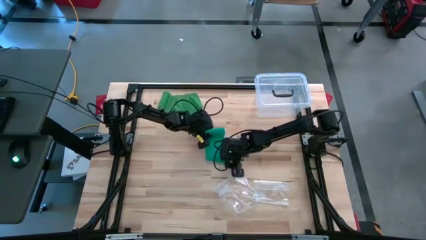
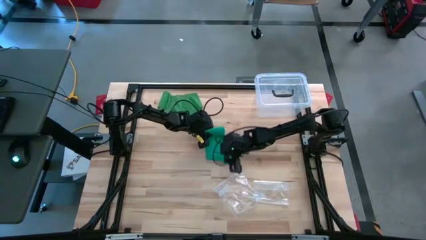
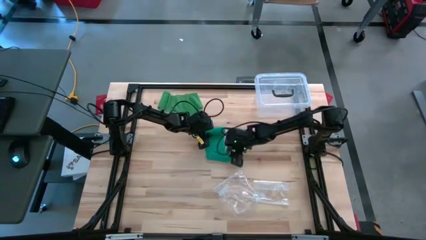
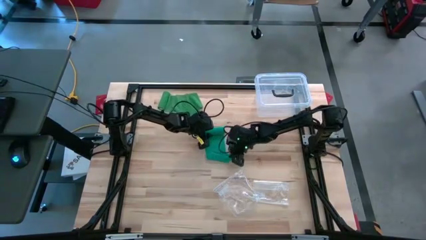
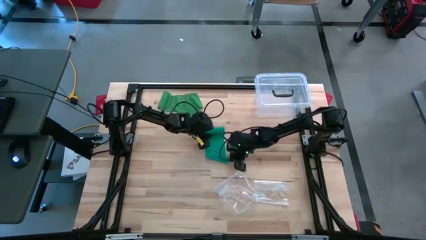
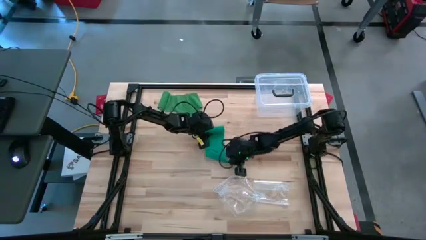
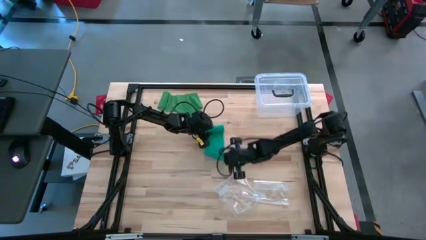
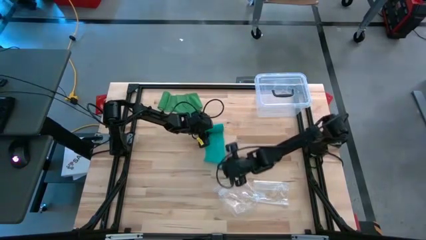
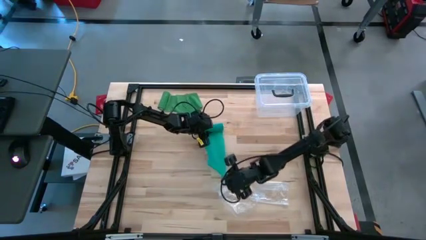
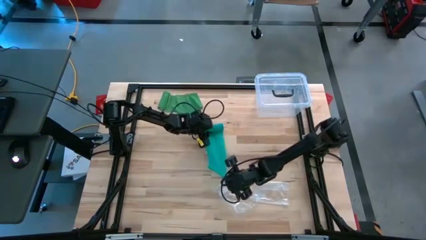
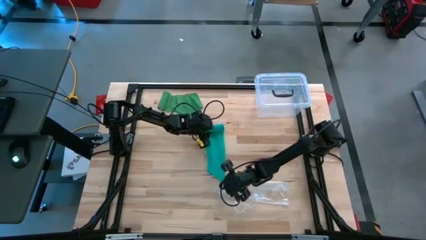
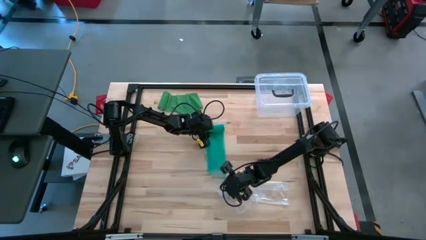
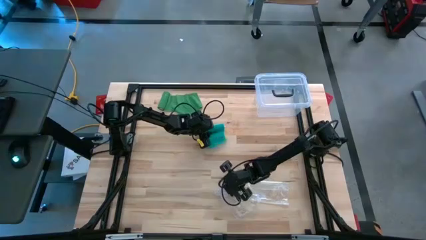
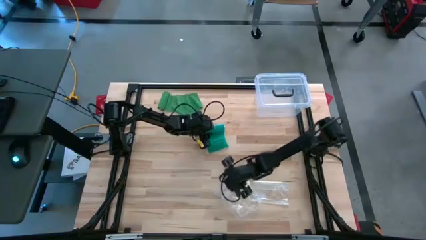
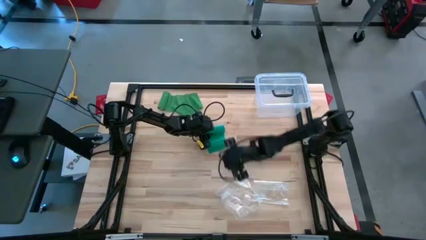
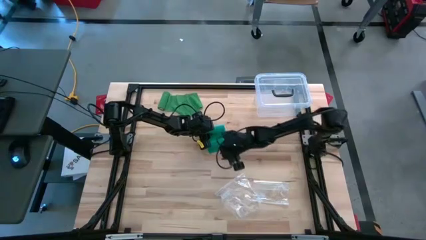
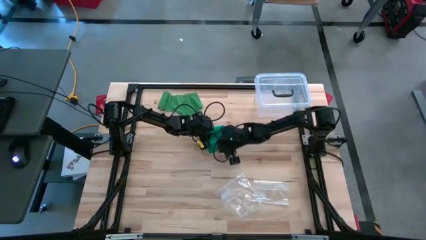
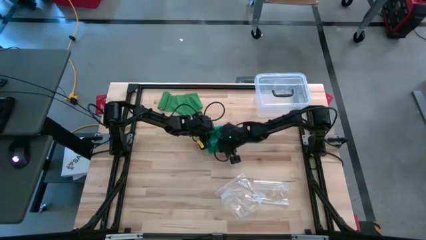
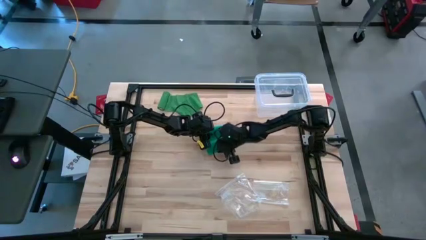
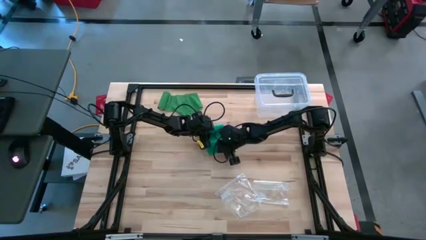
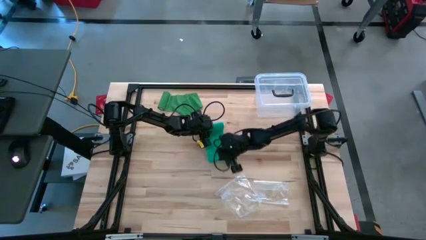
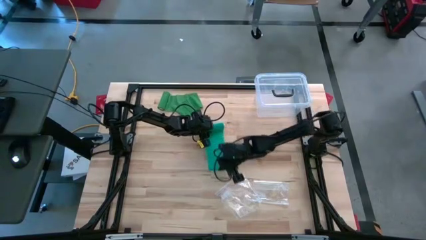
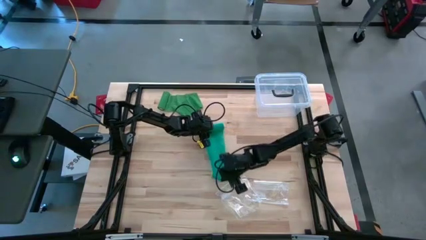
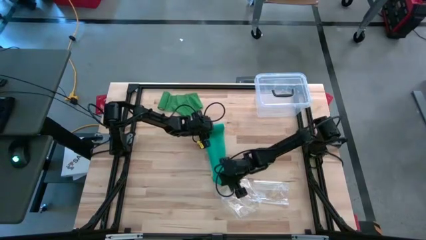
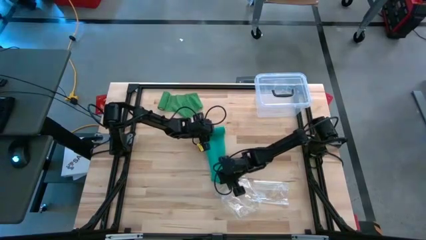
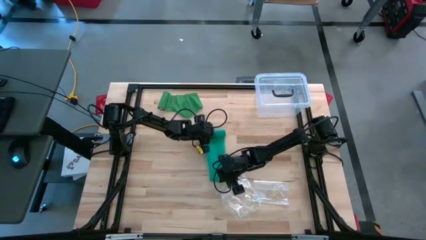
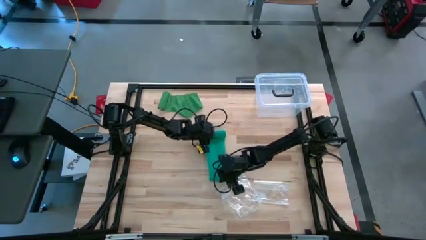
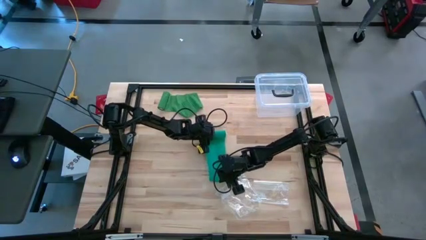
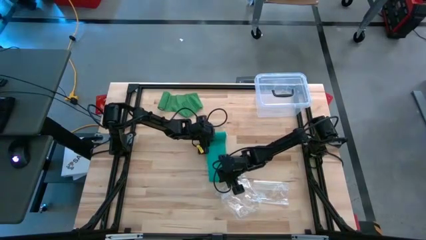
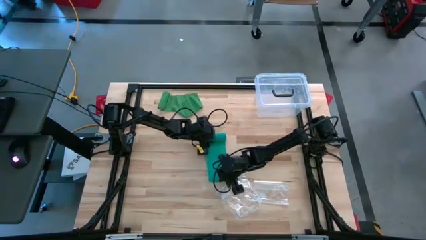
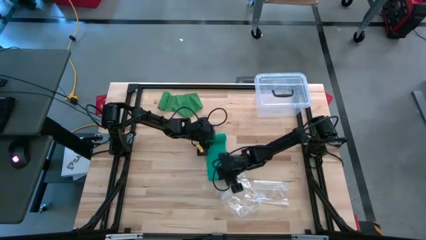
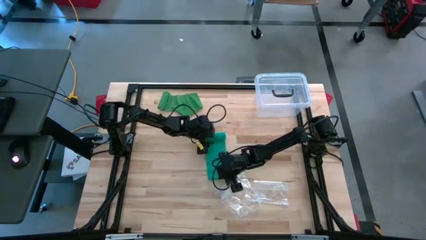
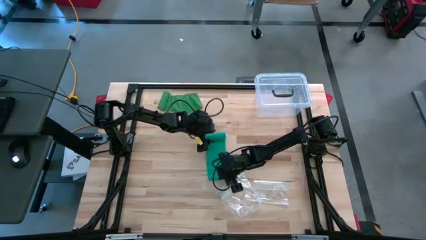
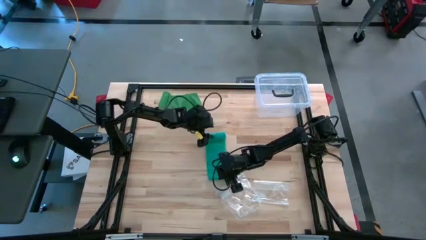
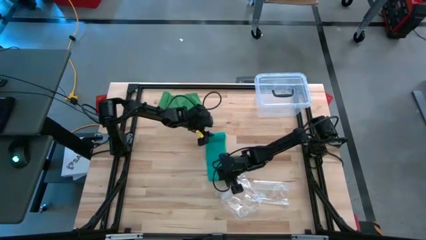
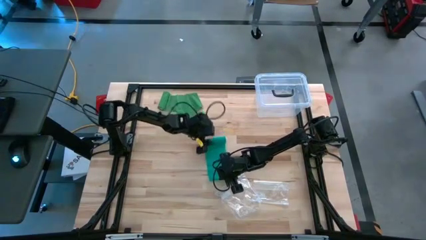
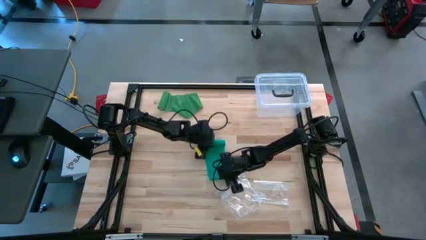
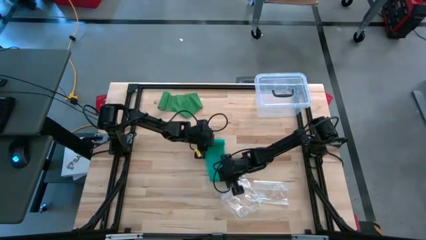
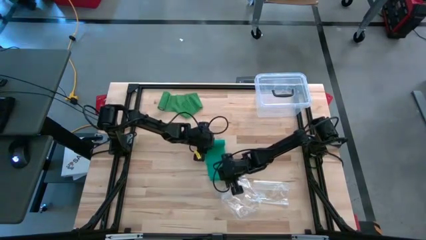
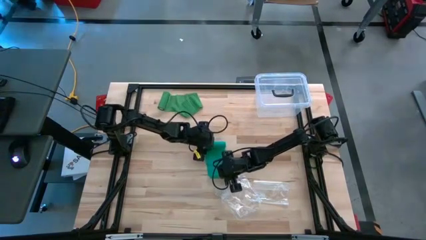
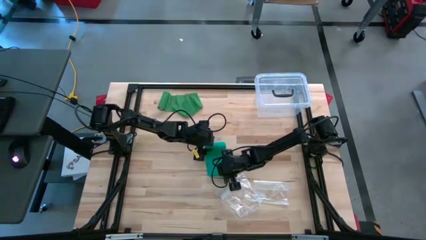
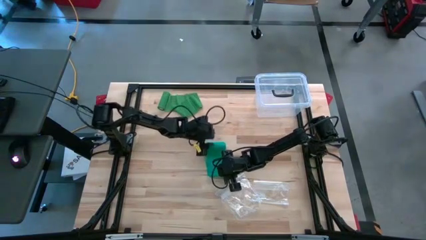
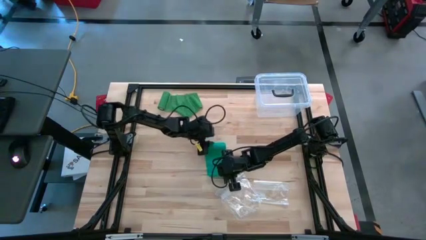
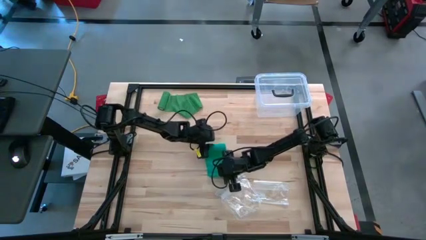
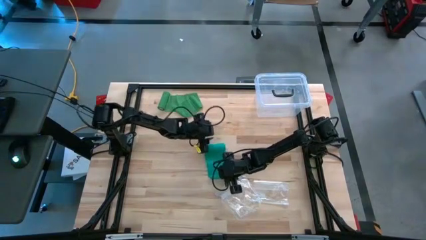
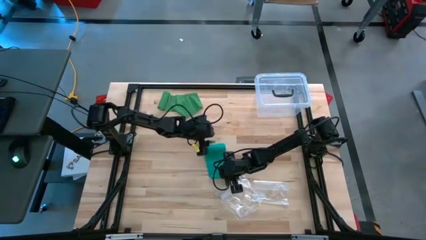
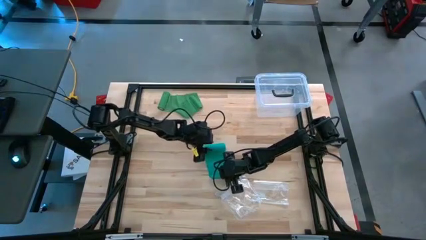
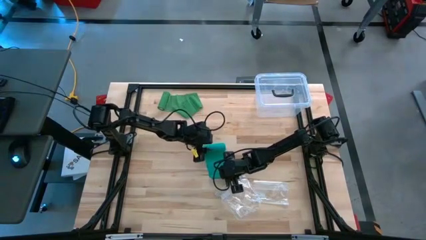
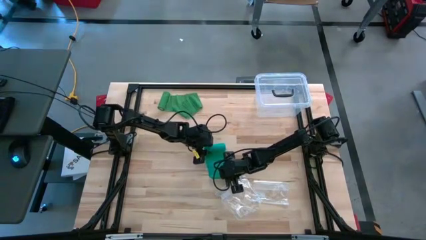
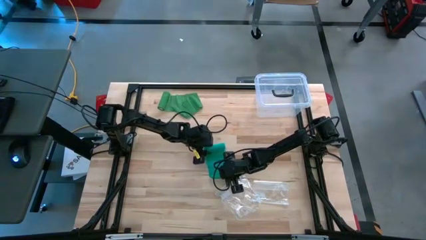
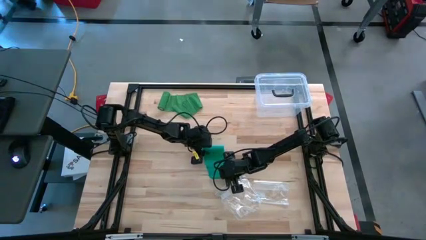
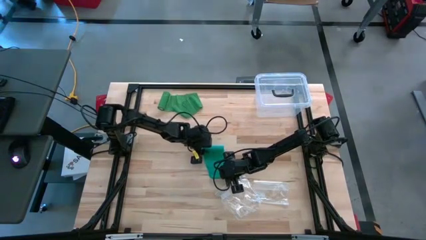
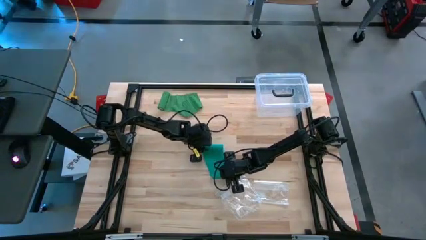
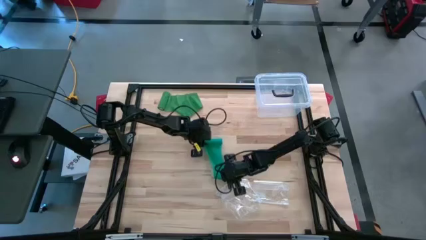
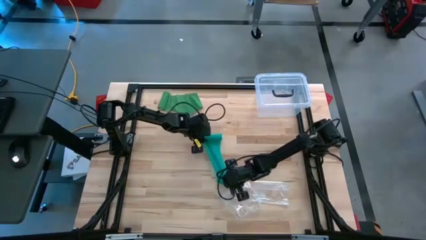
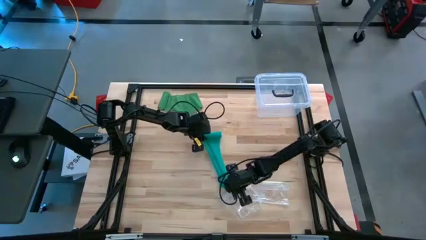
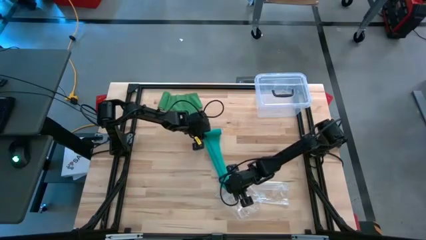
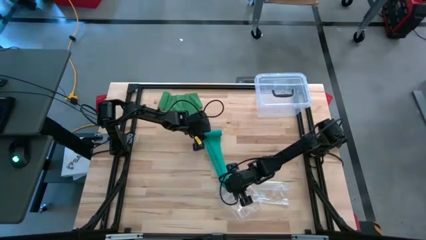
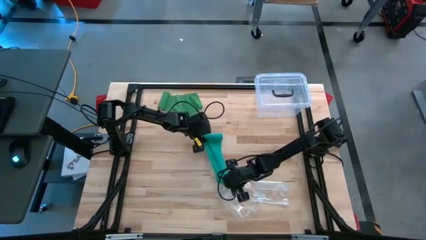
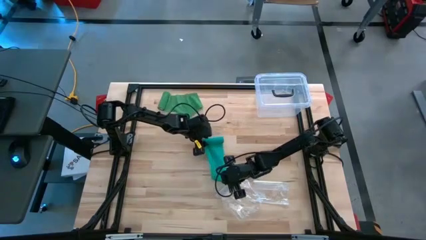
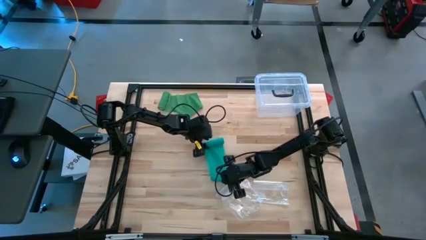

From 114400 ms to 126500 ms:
Task: Roll bandage
Roll the blue bandage

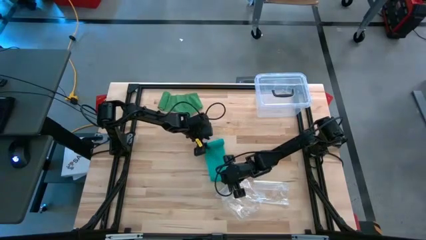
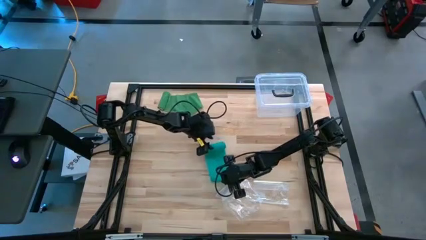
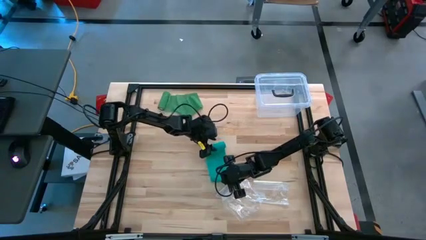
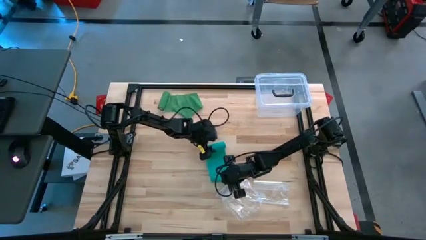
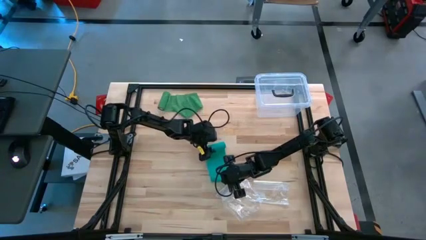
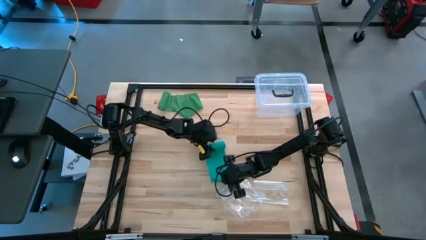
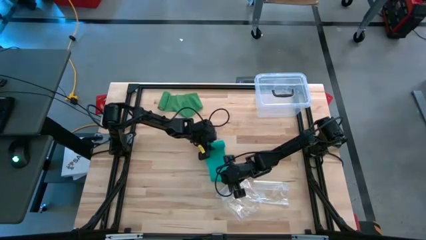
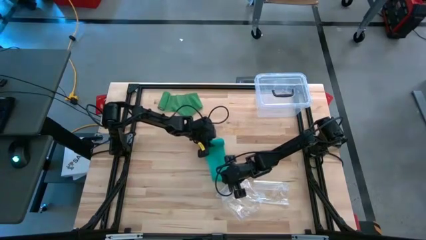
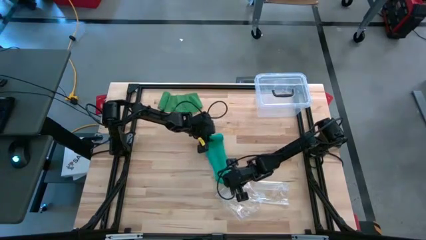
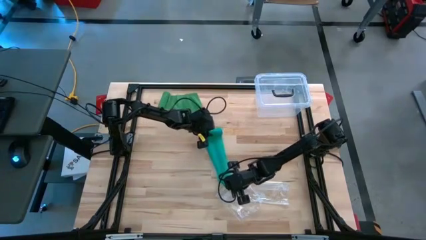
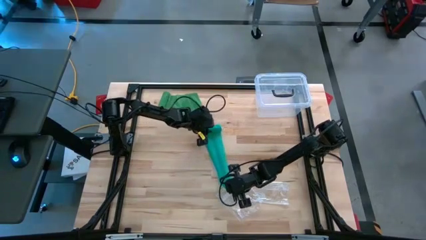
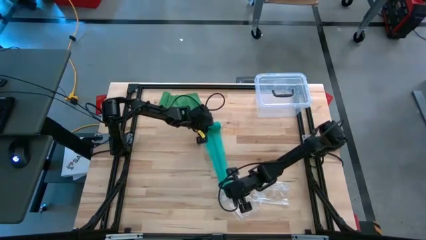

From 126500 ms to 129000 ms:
Roll the blue bandage

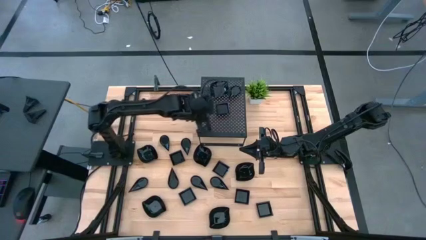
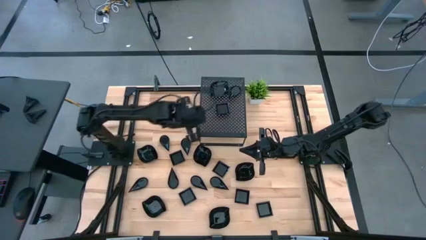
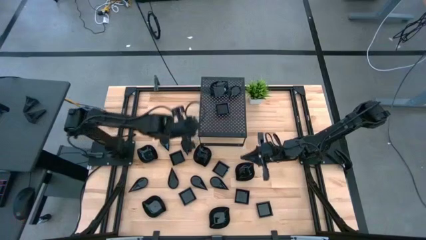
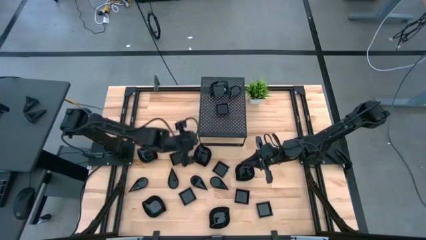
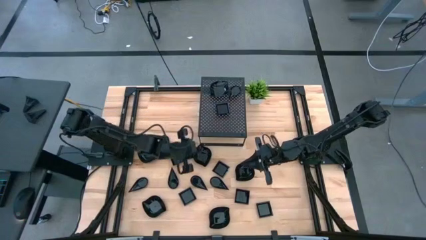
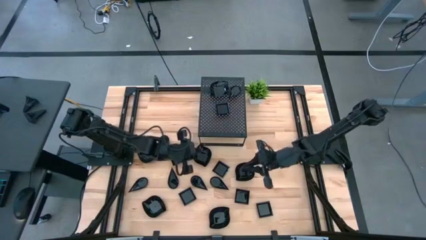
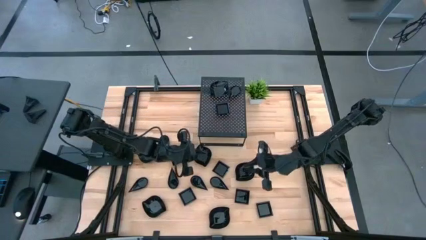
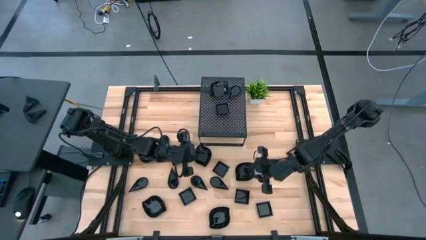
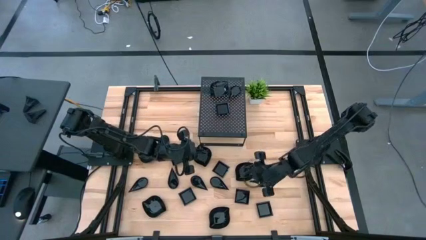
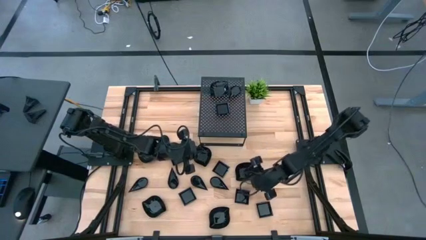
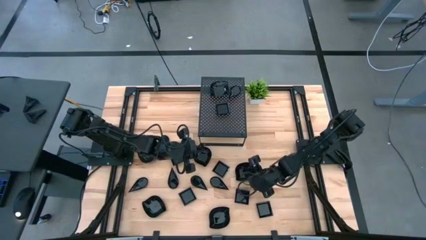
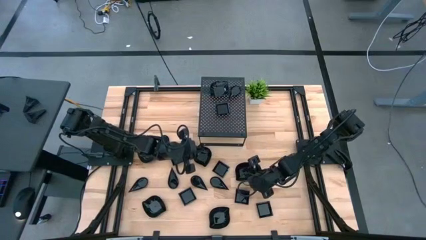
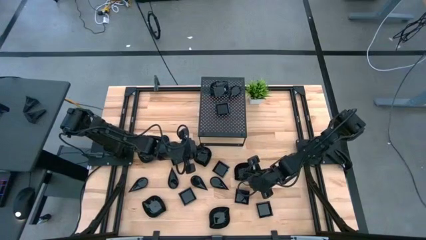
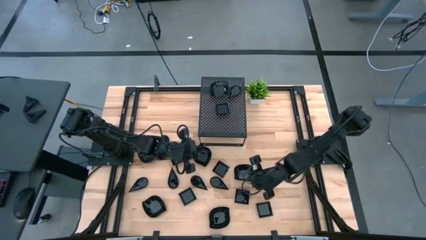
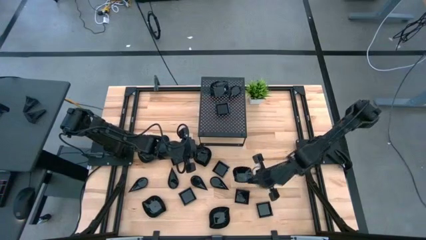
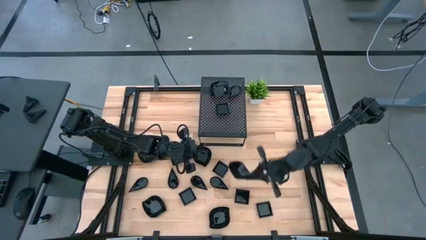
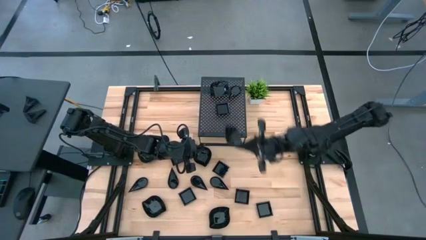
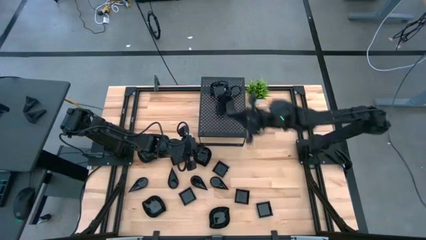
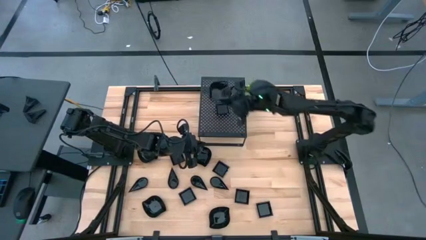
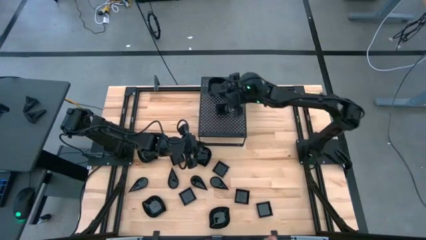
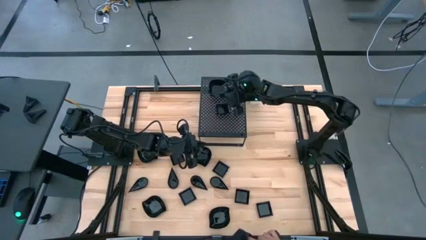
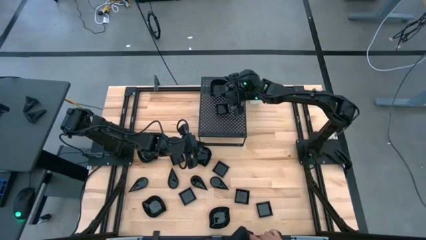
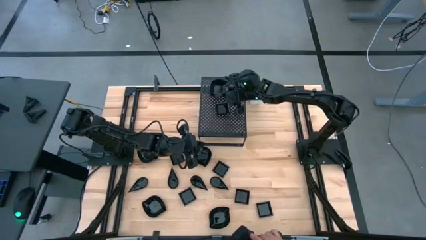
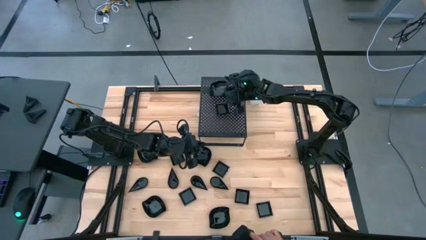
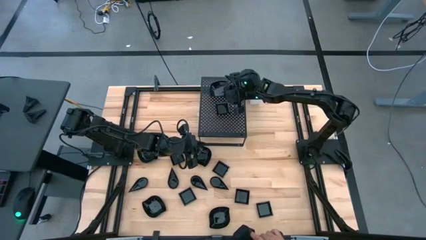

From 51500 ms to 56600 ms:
Task: Pick & Place Mini shaped plates
Stack the black leaf-shaped plate on top of the black leaf-shaped plate on the shelf
